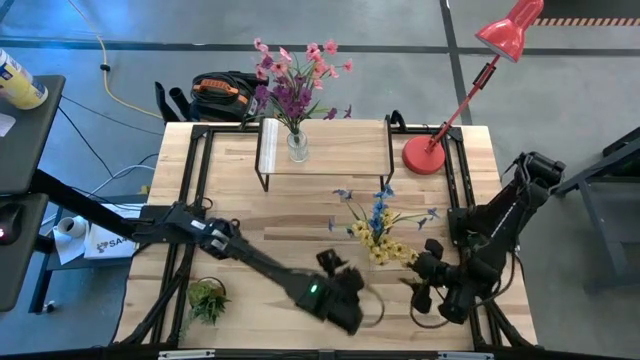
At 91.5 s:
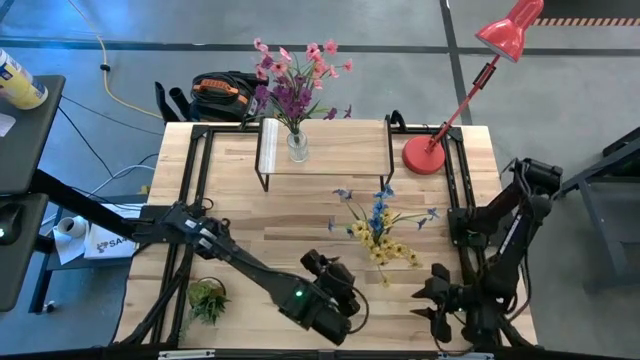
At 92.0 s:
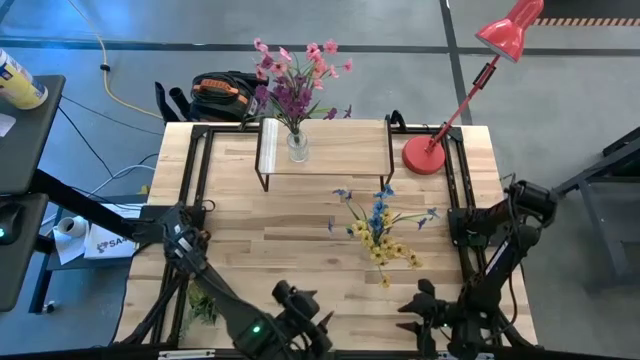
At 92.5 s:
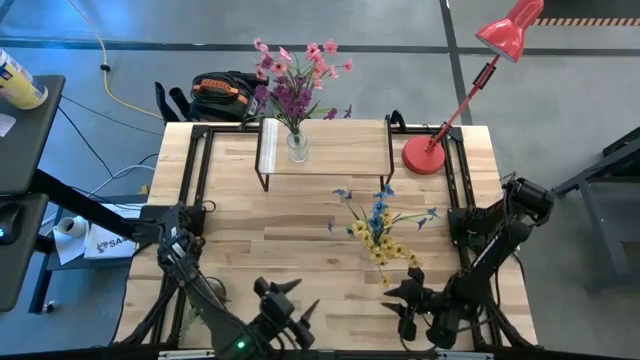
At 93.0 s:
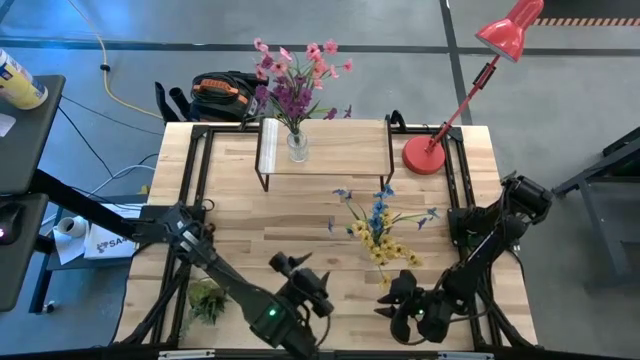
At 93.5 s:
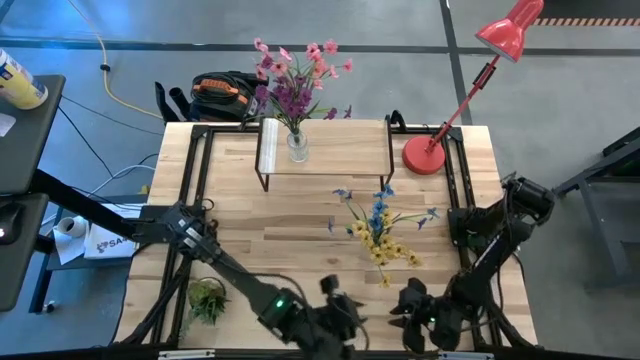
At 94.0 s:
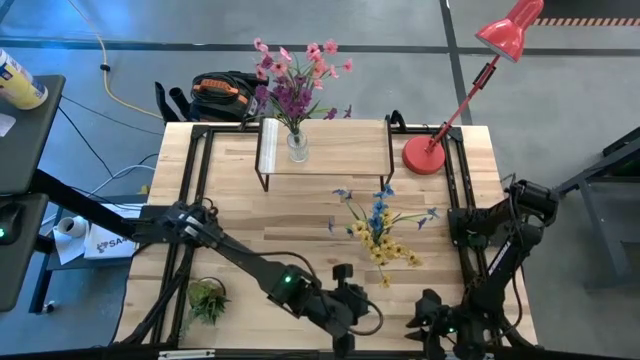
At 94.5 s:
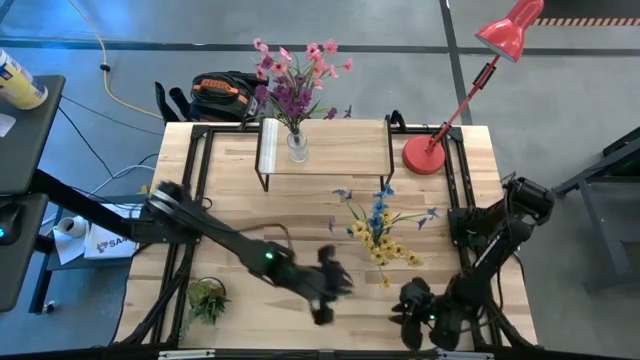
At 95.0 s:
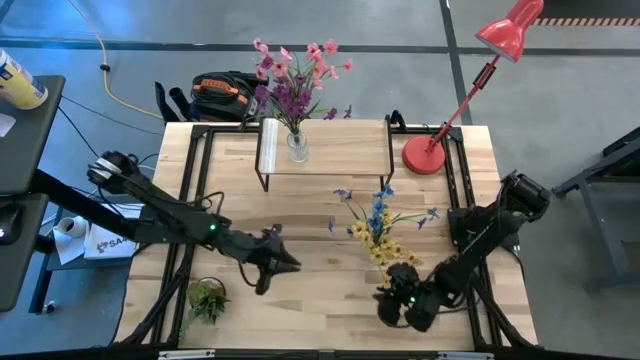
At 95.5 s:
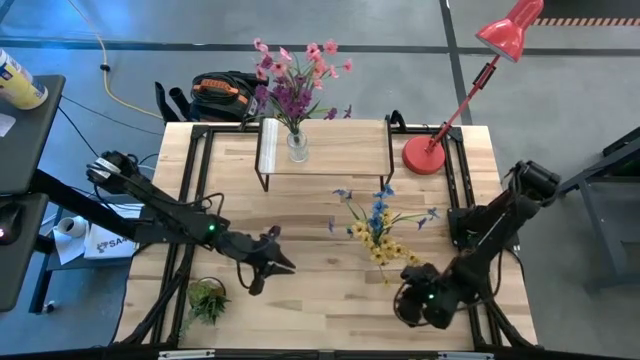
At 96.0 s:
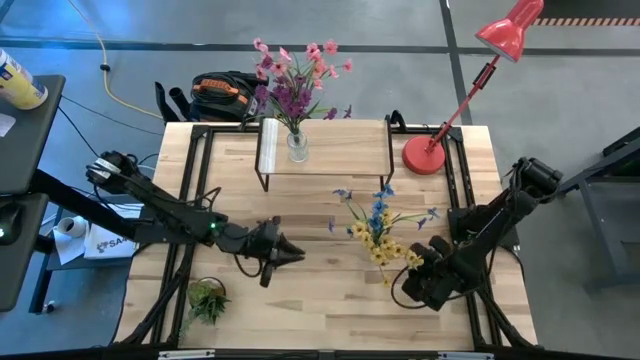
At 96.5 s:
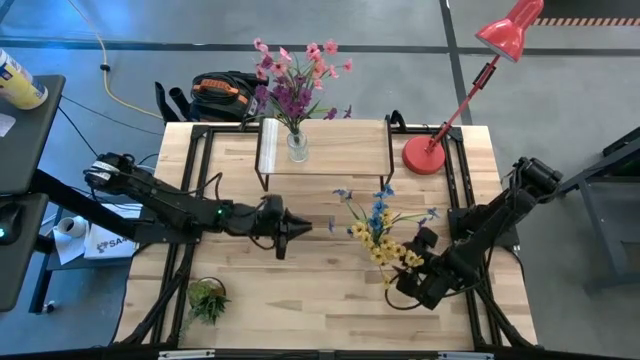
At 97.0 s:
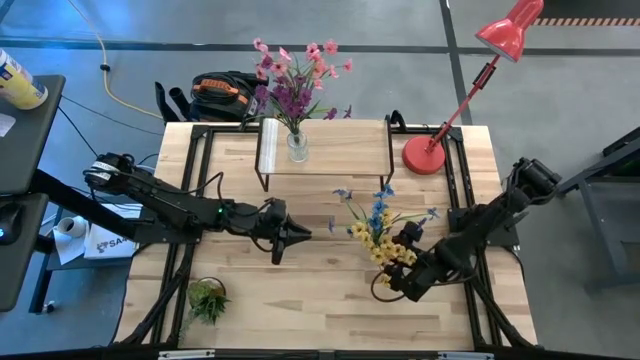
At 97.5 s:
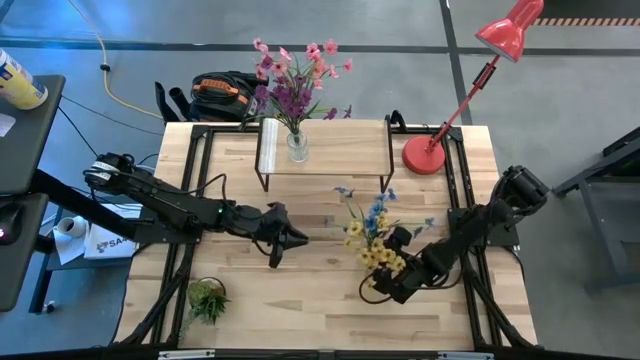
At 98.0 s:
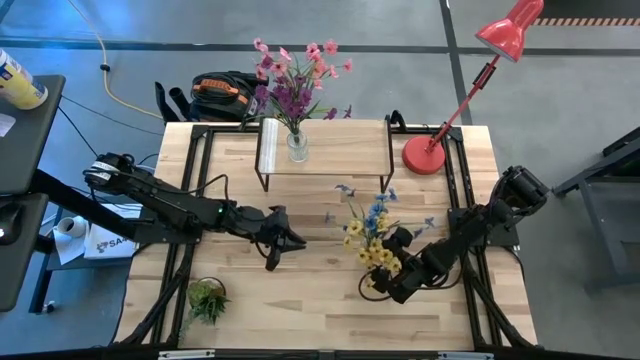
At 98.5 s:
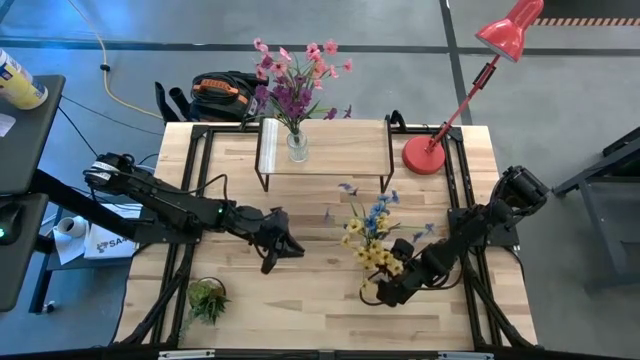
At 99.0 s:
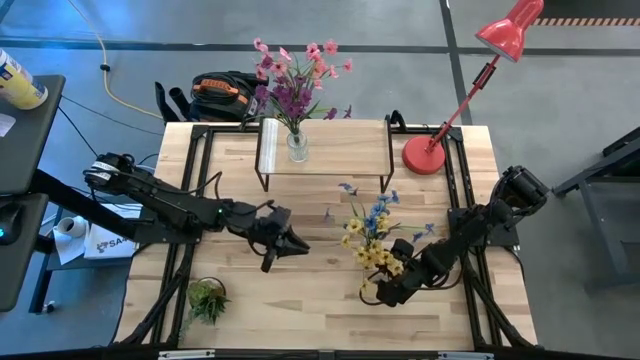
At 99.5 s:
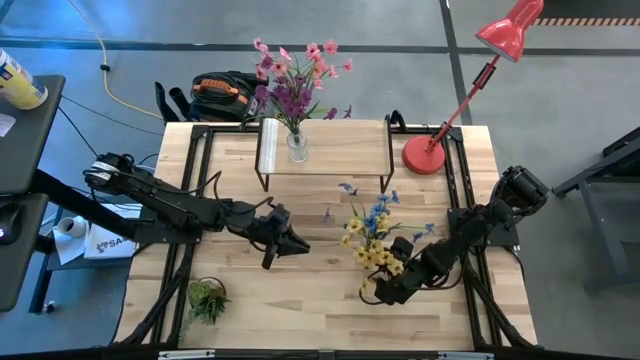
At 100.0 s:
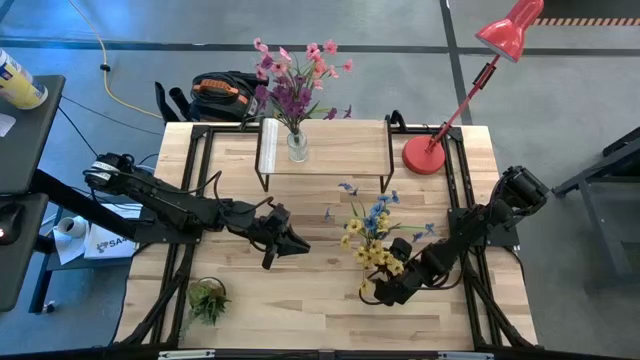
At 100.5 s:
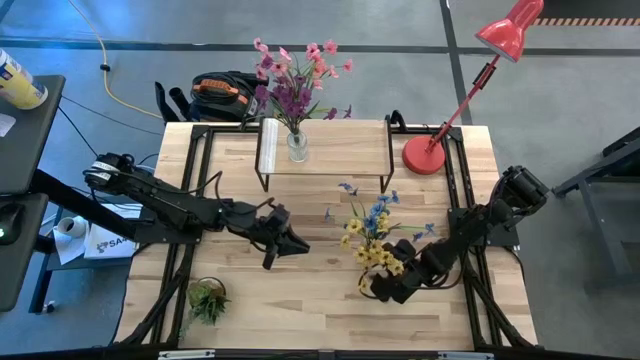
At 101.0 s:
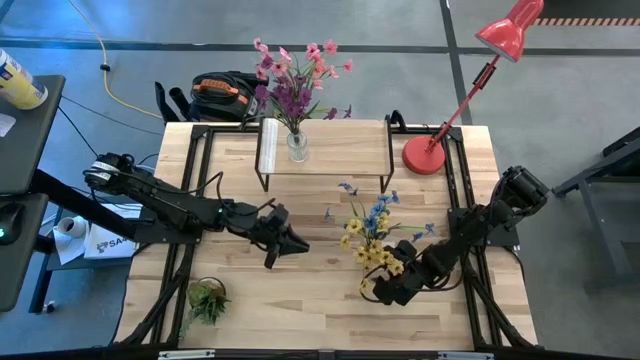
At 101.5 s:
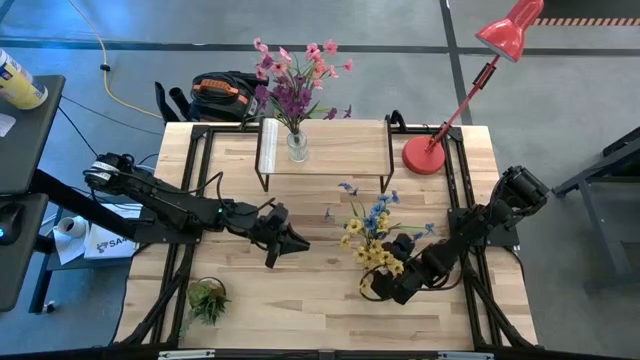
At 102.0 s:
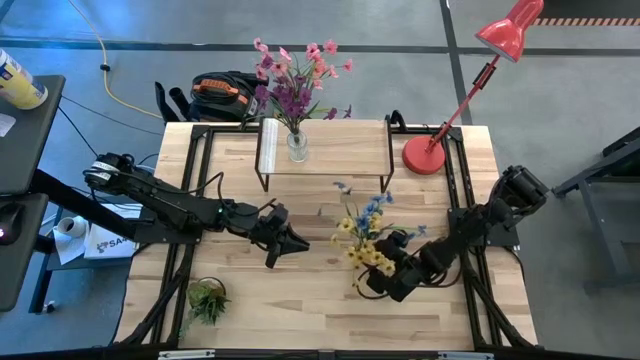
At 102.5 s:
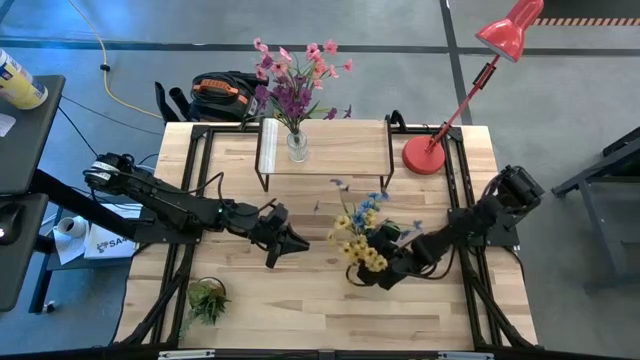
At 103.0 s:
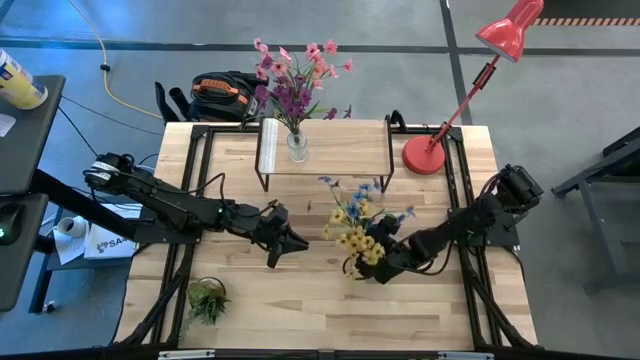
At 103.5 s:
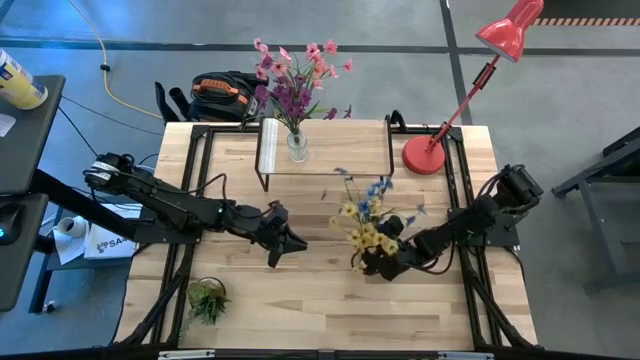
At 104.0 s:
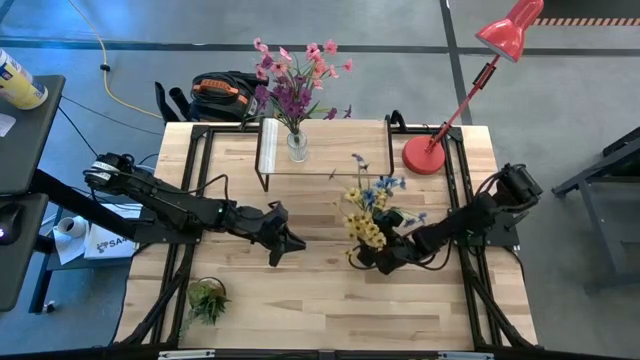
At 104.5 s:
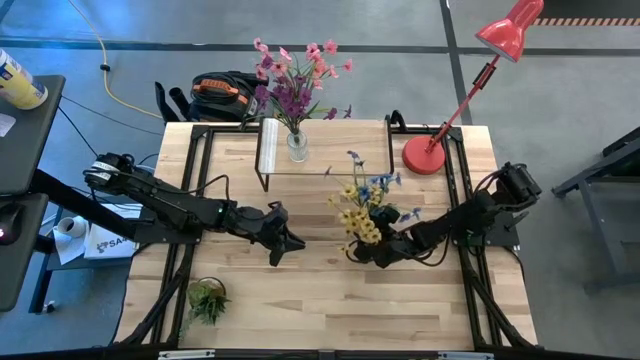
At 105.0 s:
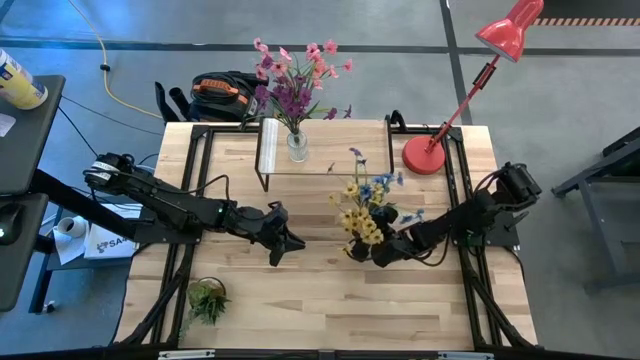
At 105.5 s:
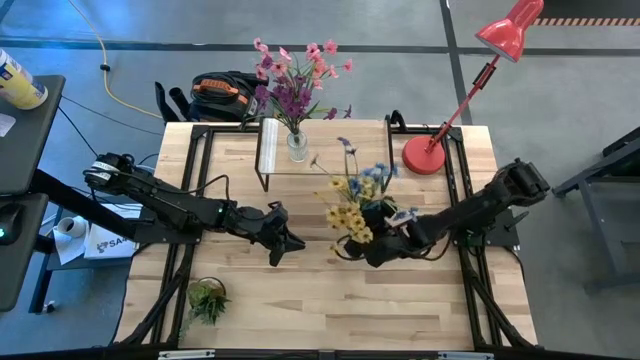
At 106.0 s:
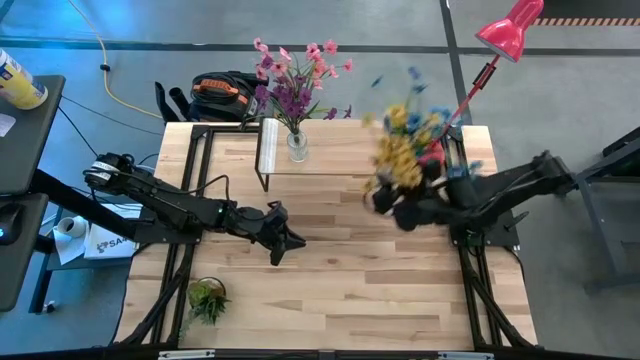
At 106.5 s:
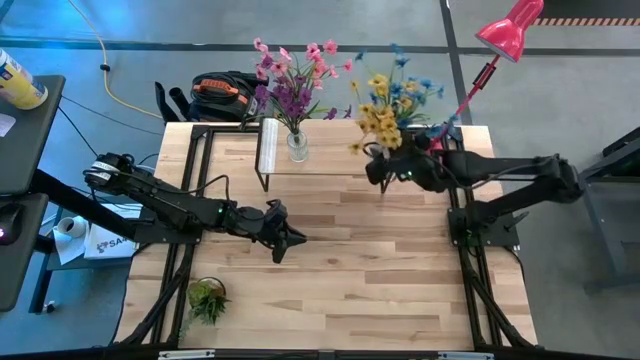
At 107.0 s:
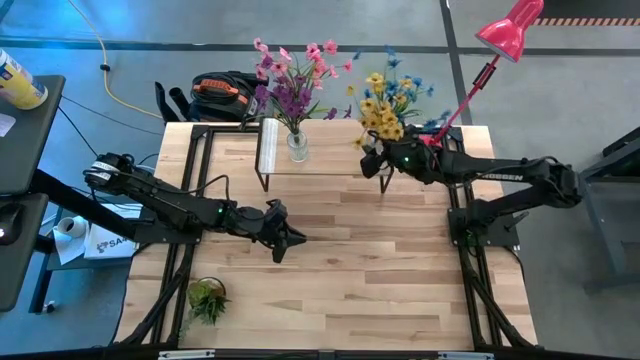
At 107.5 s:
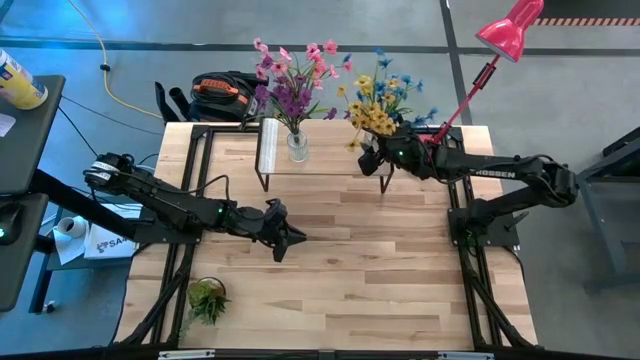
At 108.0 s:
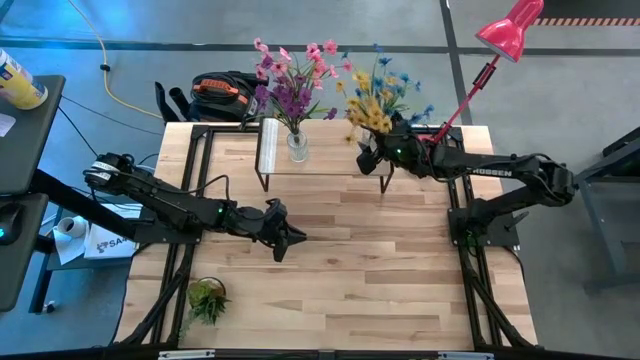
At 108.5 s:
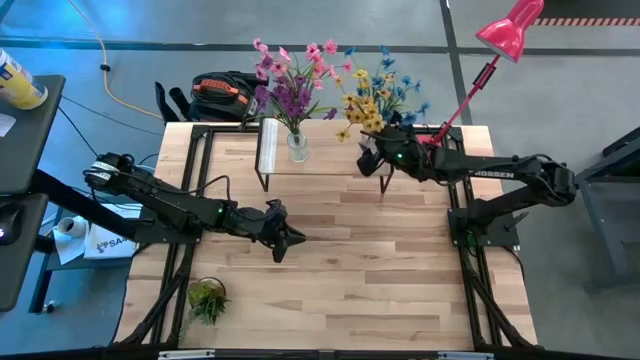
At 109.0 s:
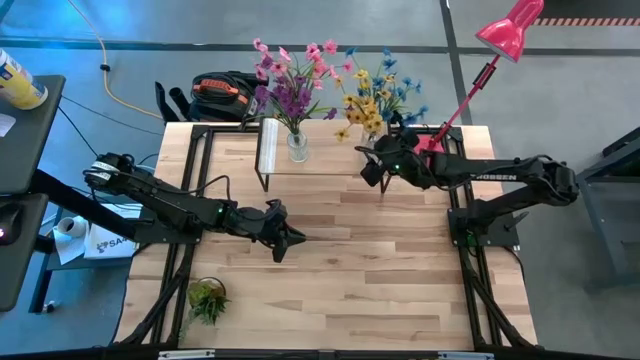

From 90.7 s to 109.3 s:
Task: Pick and place flowers into a vace then onto a shelf
Put the transparent vase on the shelf

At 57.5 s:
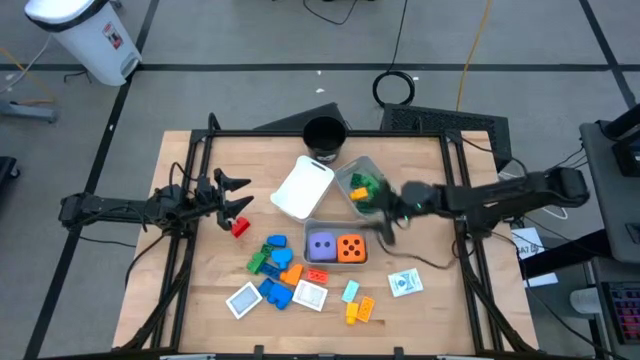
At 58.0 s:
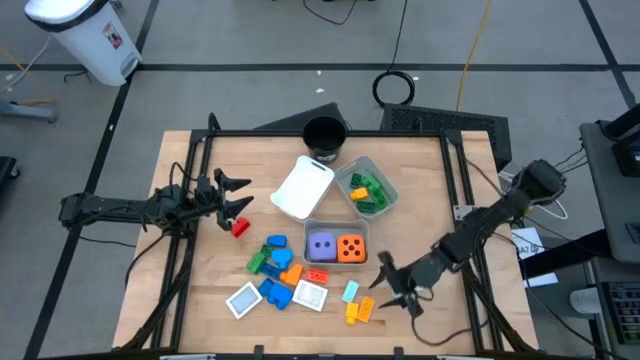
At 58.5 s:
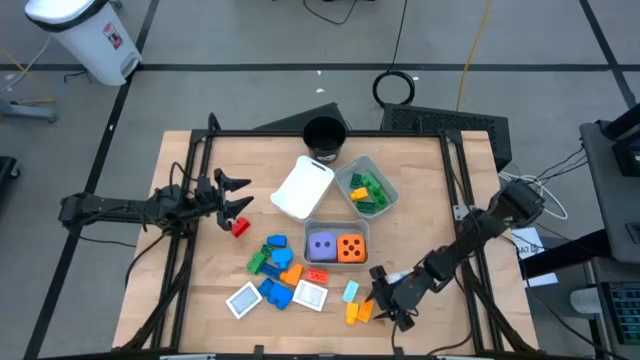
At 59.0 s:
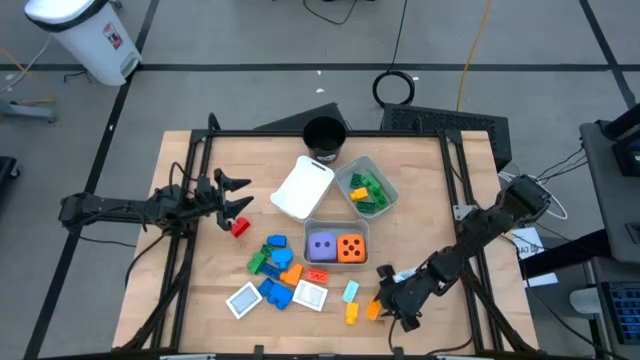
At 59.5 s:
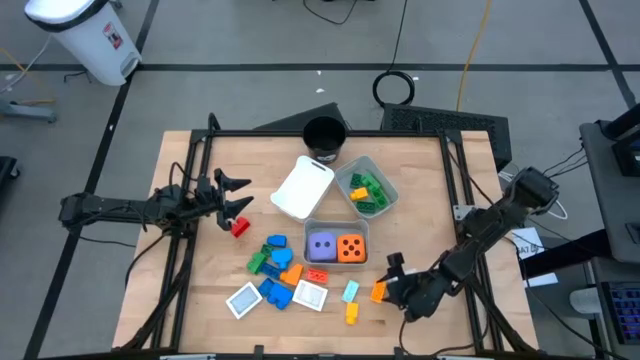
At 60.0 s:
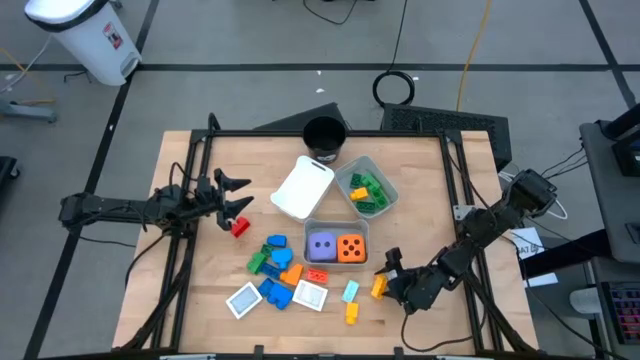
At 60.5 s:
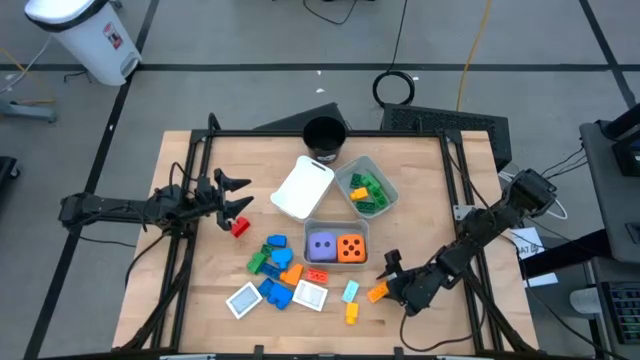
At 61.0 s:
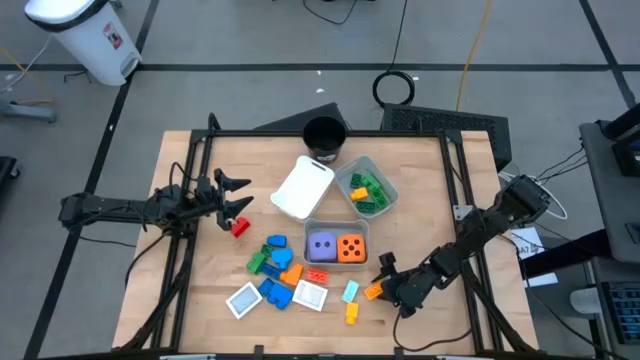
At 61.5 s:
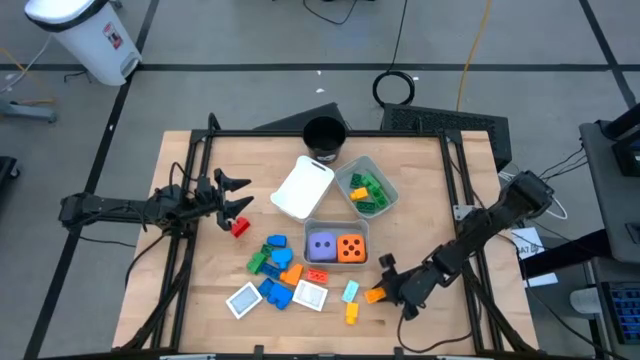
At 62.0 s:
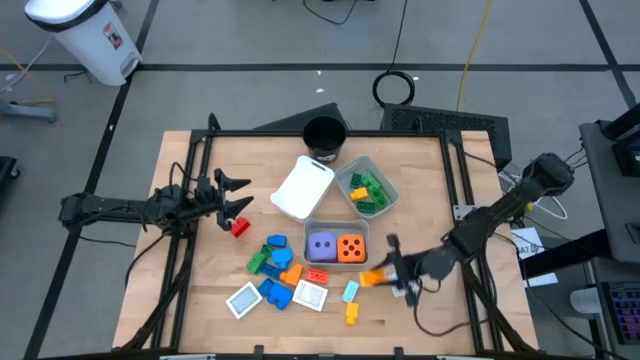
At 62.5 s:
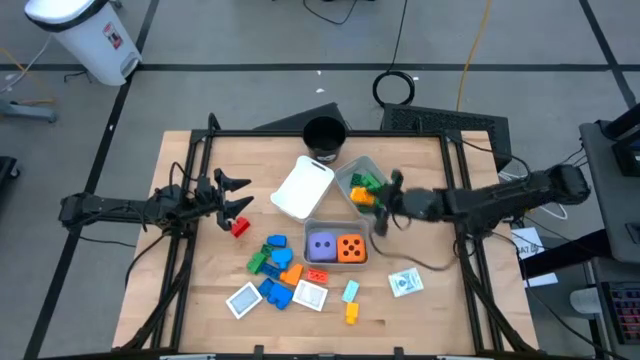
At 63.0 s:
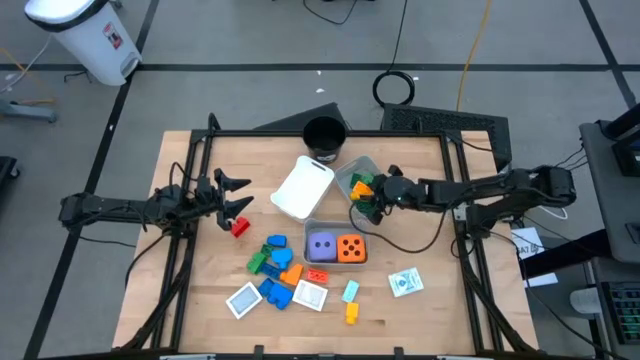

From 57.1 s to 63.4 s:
Task: Pick & Place Toys
Put the orange game piece into the top gray bin
